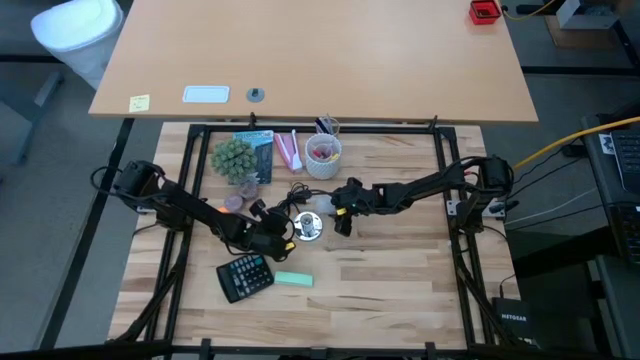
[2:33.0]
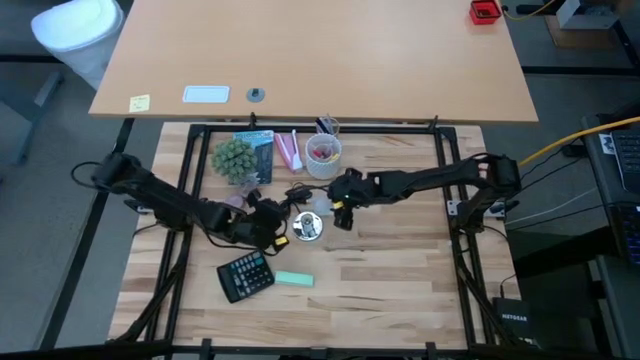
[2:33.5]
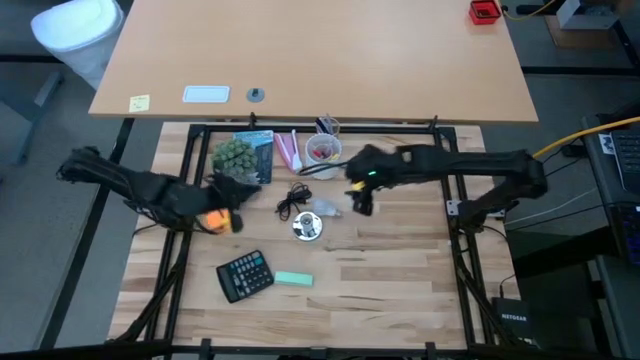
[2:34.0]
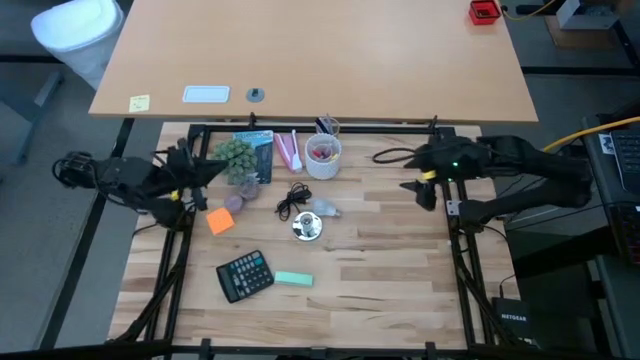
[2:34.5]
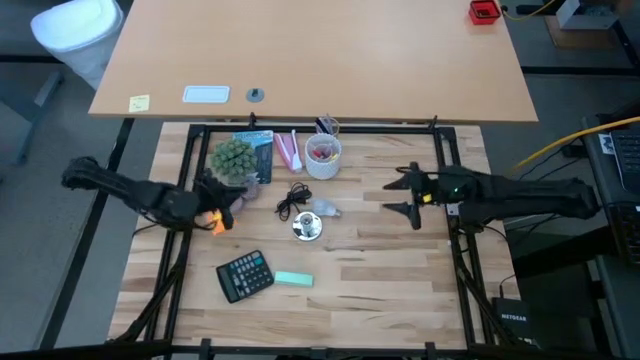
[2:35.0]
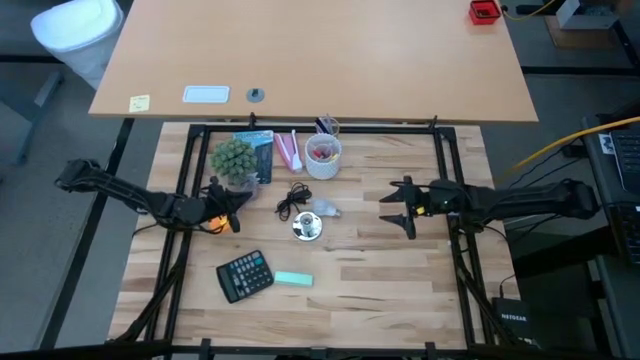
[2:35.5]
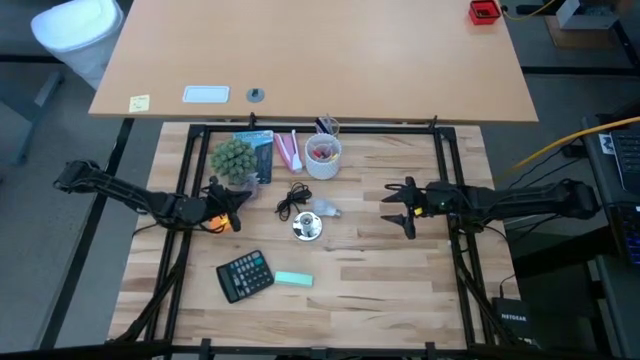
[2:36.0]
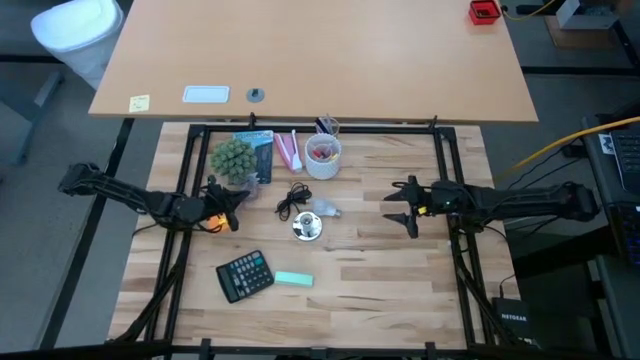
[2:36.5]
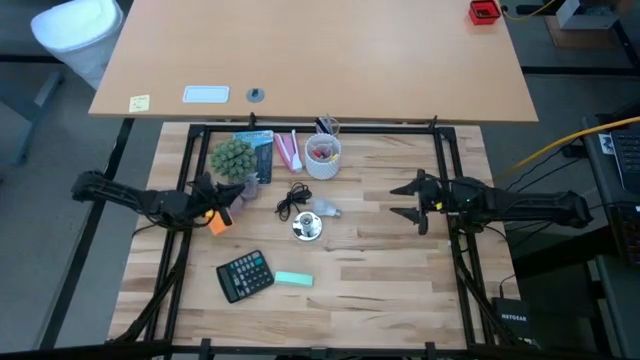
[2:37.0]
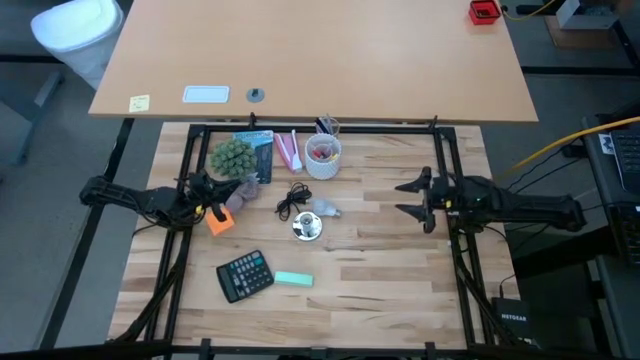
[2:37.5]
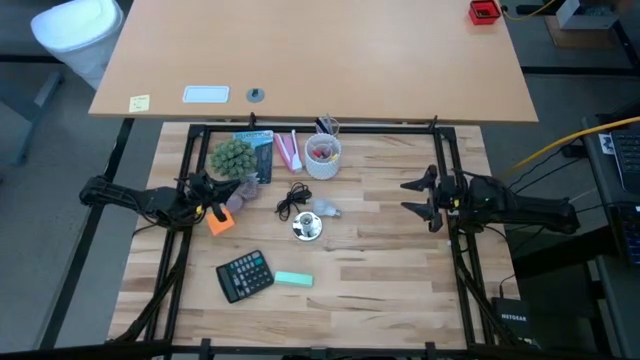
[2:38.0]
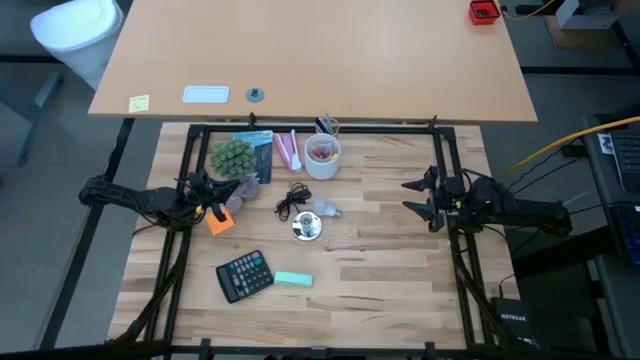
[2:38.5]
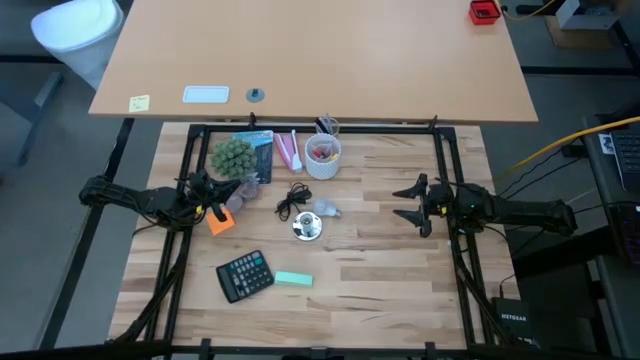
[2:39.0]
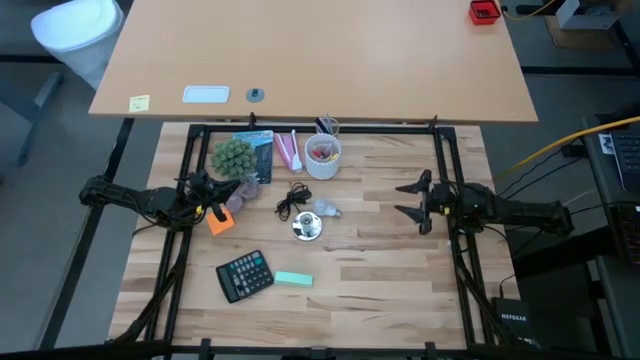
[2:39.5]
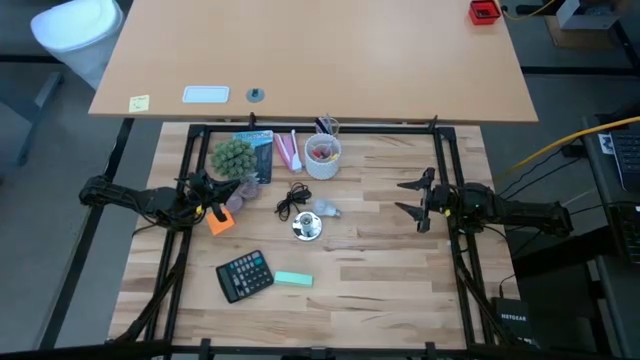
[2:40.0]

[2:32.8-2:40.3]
Task: Screw lightbulb
Return to Home Position

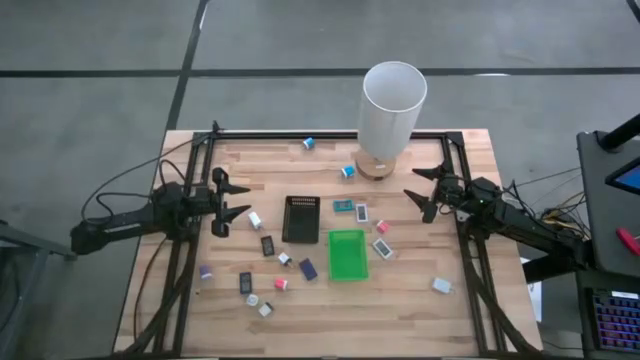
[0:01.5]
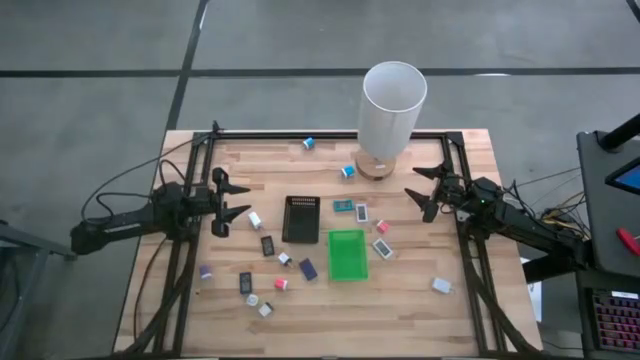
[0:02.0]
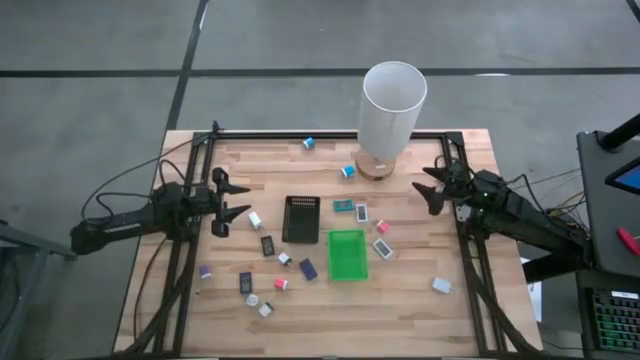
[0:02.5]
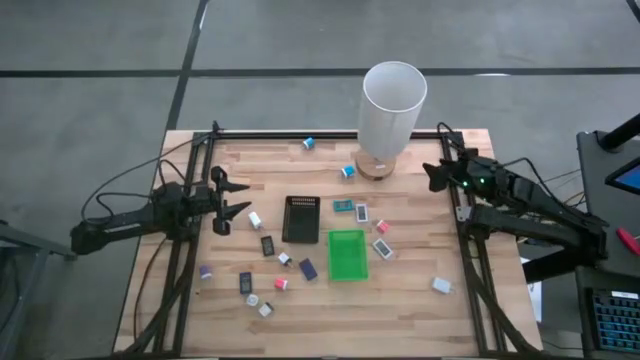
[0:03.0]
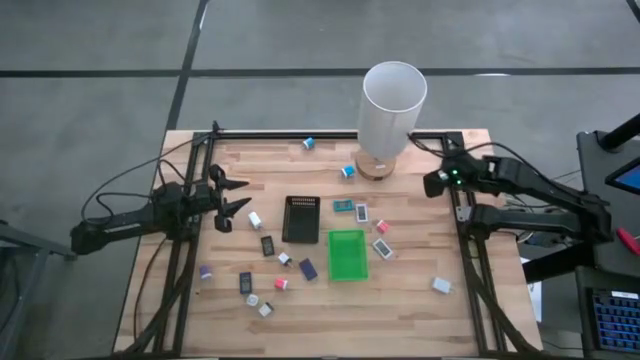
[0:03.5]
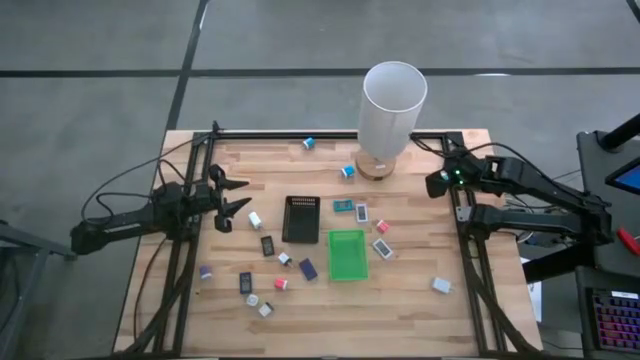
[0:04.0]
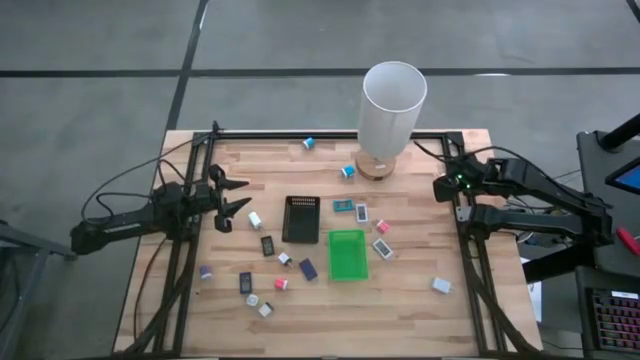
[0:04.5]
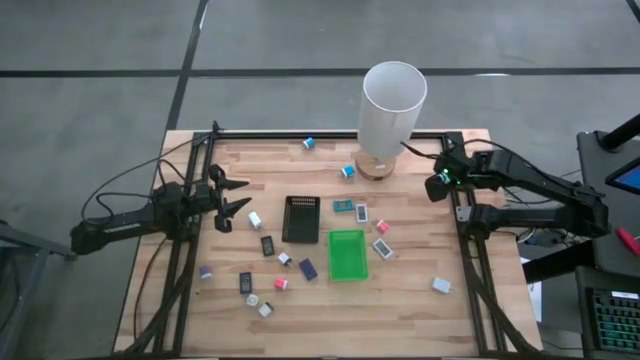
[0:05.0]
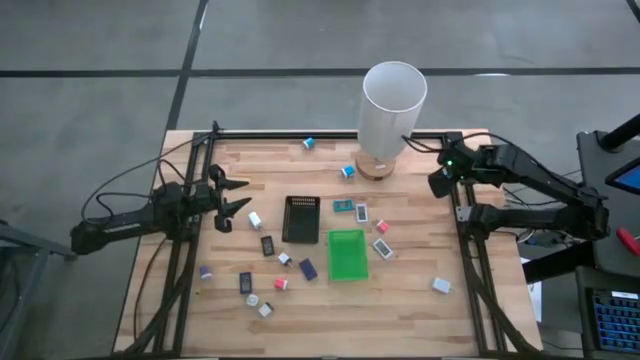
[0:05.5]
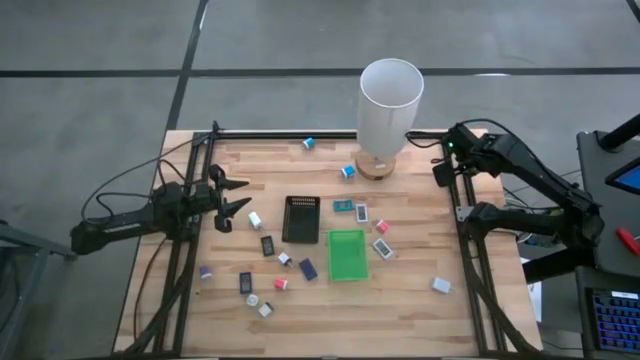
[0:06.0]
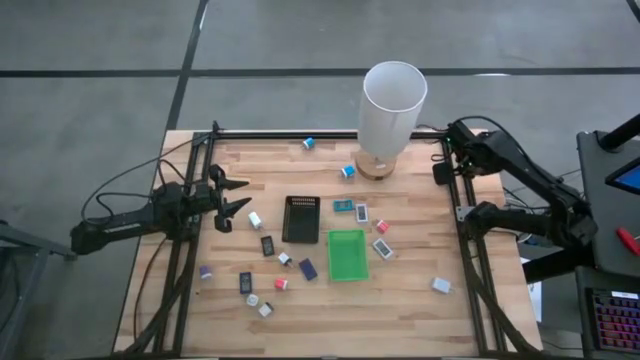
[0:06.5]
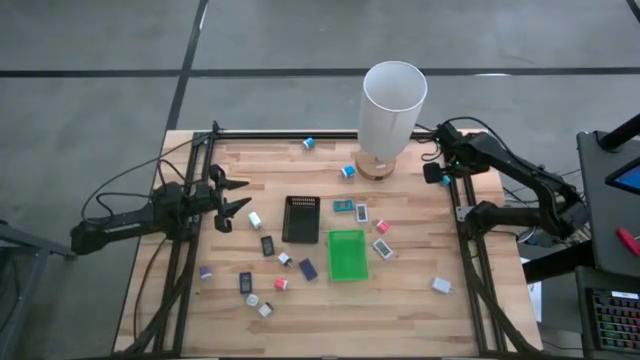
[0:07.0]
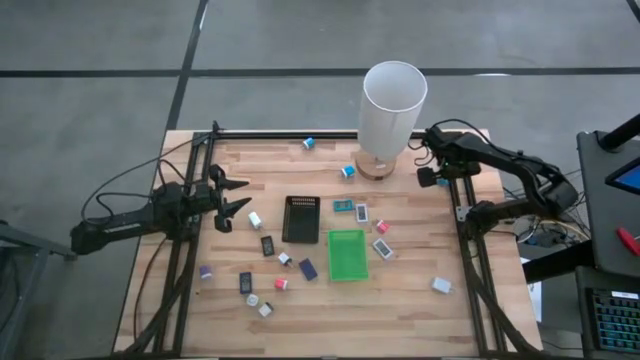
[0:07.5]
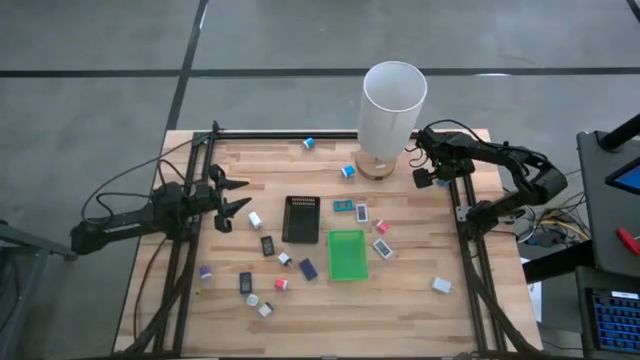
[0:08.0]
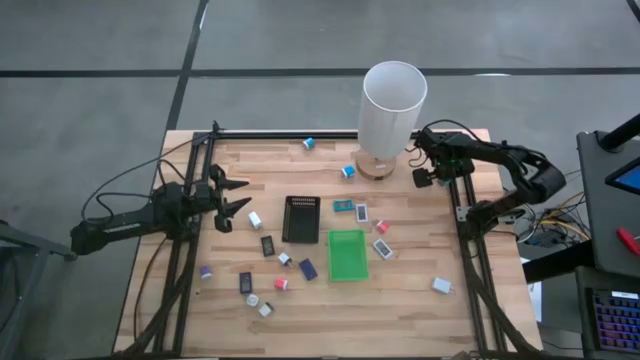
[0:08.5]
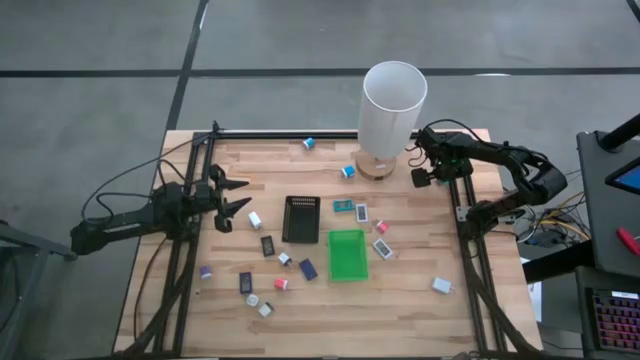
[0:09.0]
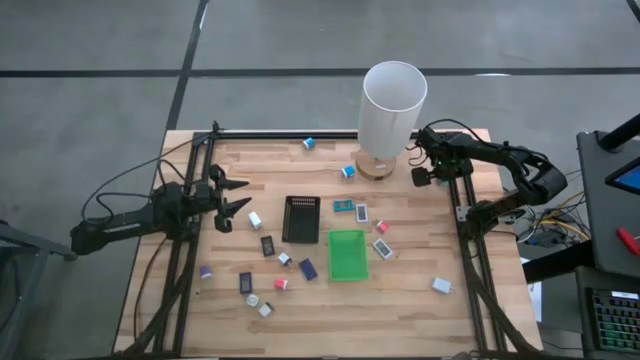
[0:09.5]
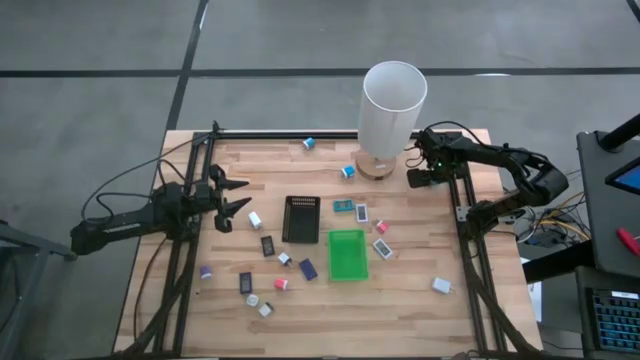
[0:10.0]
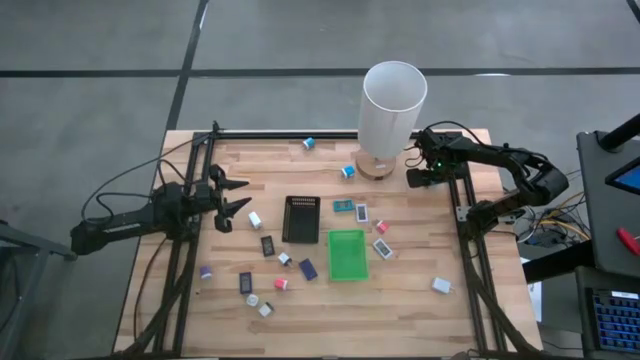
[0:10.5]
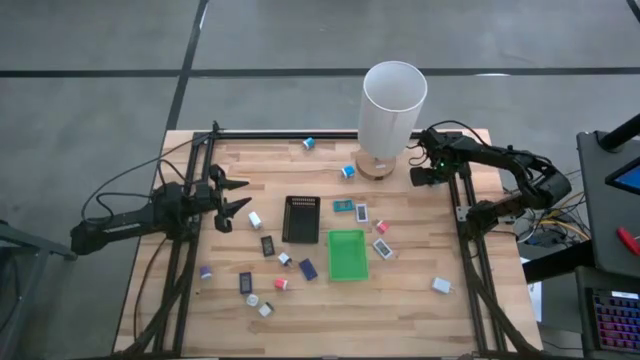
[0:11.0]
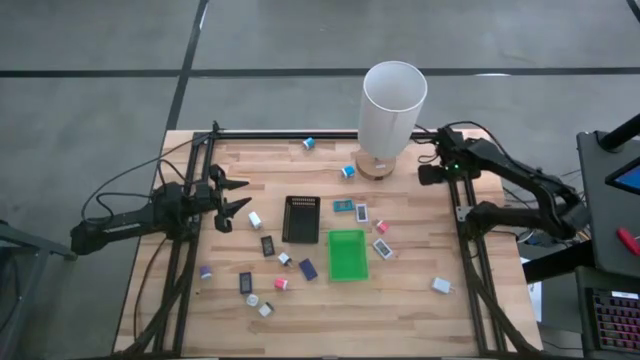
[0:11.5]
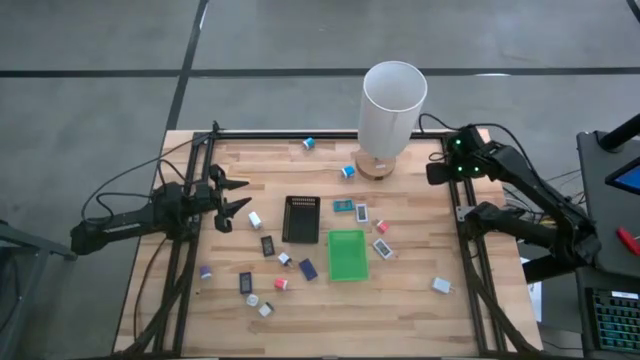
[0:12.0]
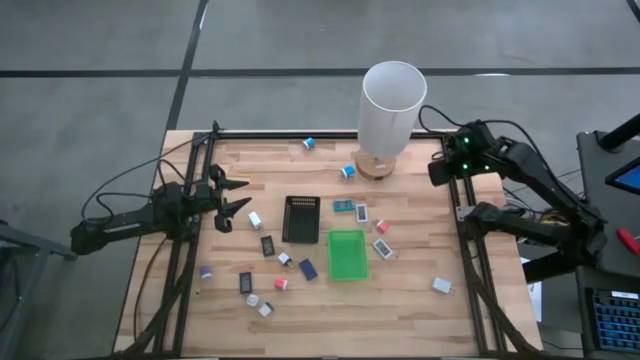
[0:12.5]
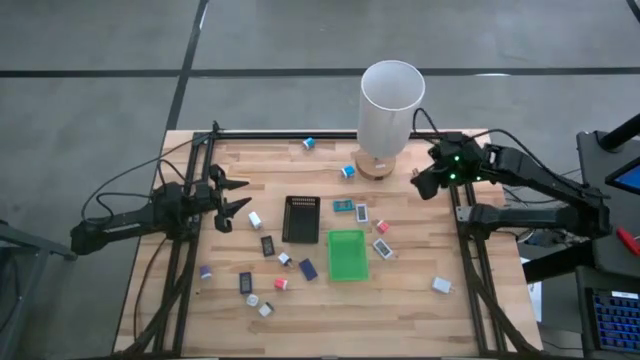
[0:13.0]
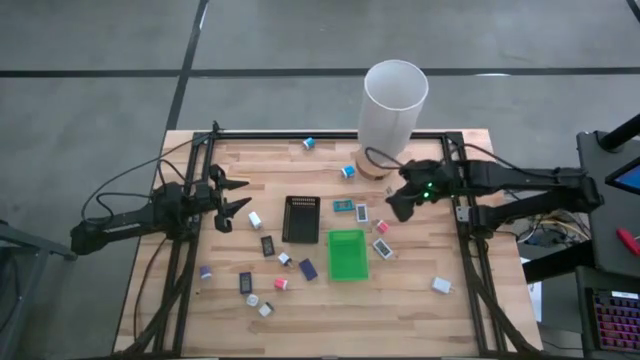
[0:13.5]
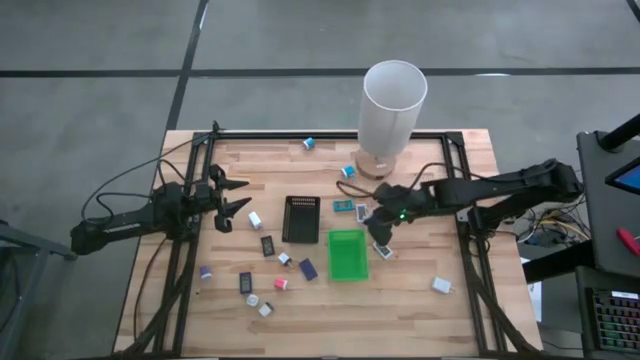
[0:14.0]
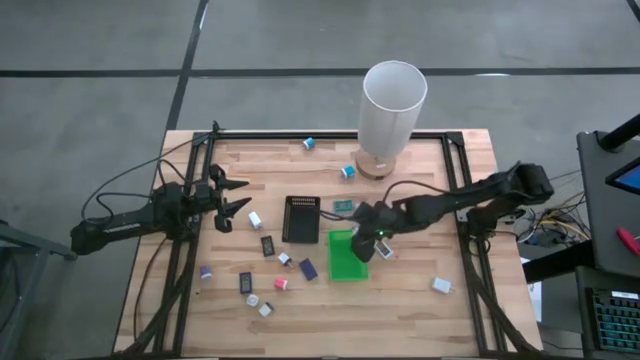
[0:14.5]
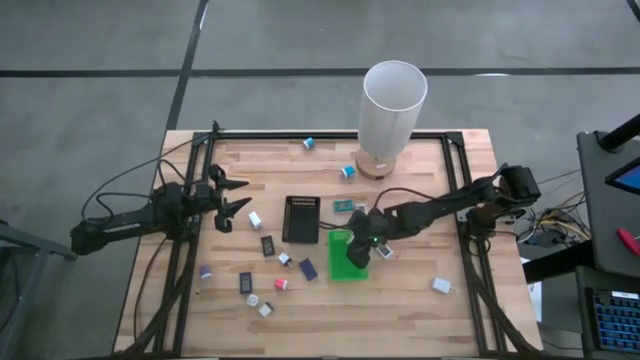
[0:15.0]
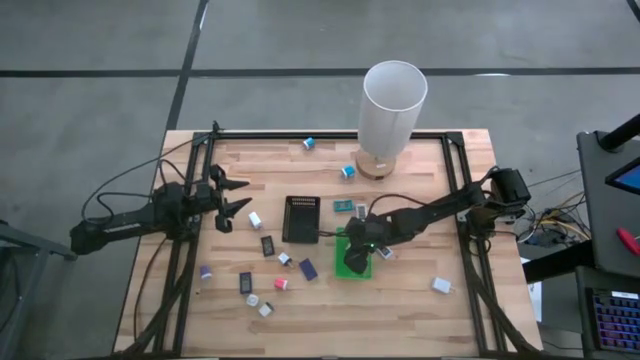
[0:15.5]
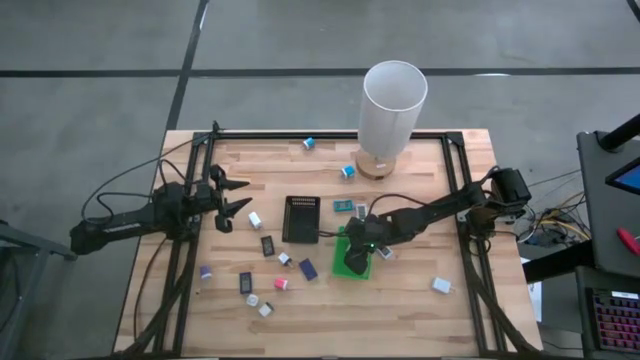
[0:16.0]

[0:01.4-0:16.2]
Task: Pick & Place Office items
Put the bottom right blue charger adapter into the green bin
